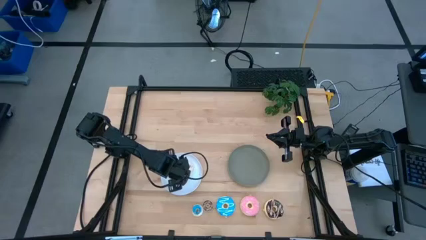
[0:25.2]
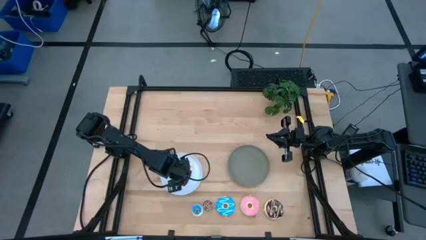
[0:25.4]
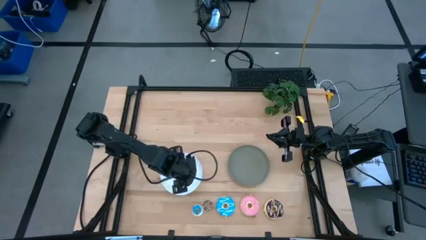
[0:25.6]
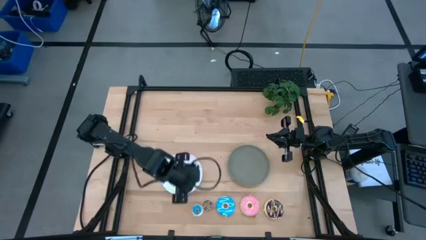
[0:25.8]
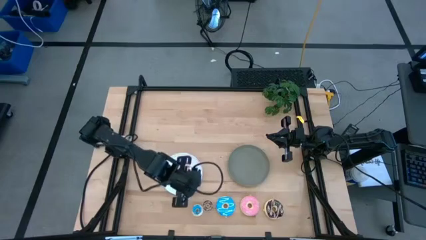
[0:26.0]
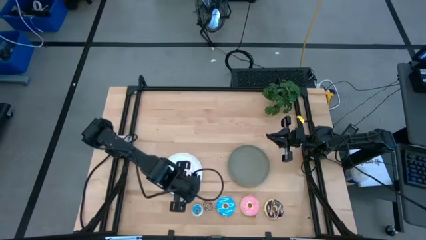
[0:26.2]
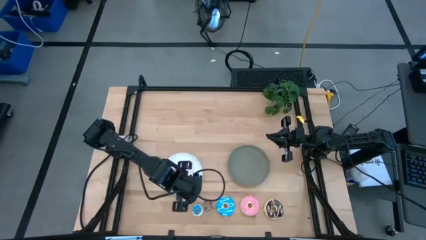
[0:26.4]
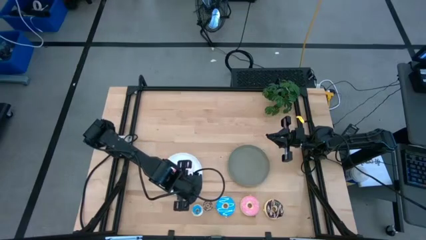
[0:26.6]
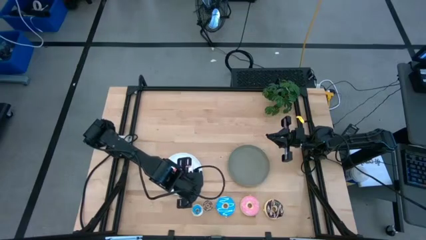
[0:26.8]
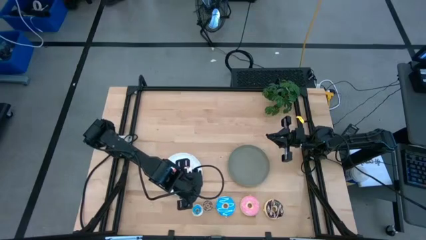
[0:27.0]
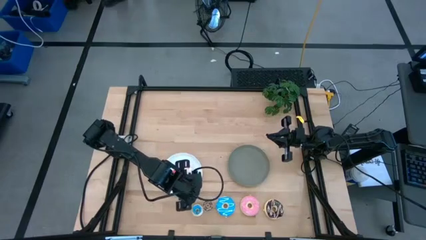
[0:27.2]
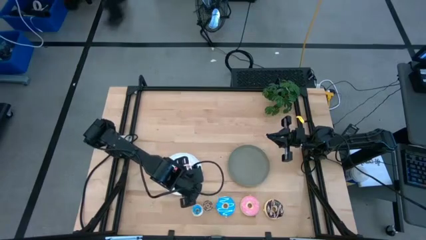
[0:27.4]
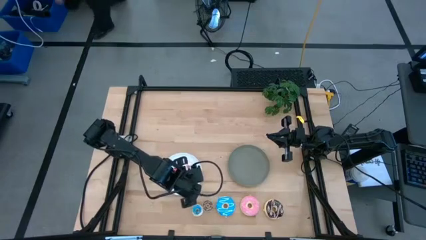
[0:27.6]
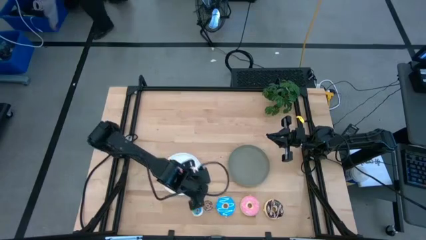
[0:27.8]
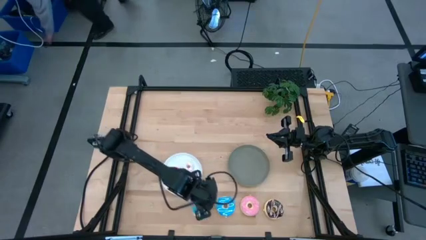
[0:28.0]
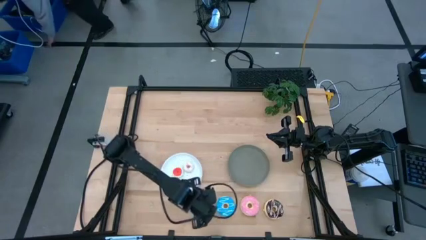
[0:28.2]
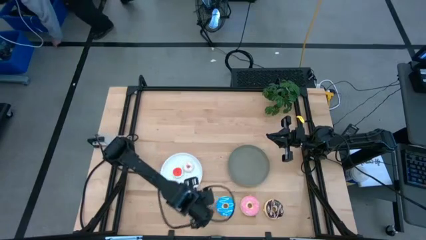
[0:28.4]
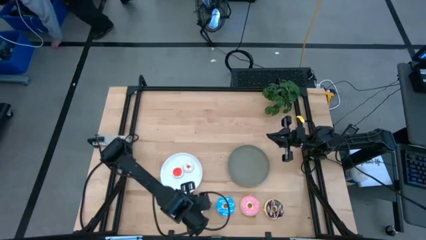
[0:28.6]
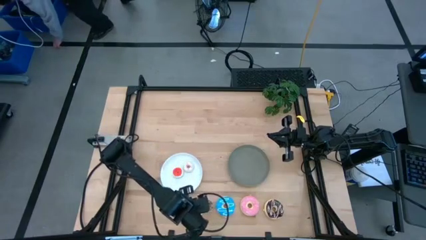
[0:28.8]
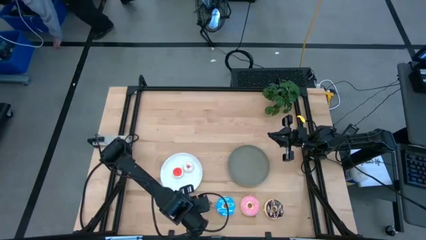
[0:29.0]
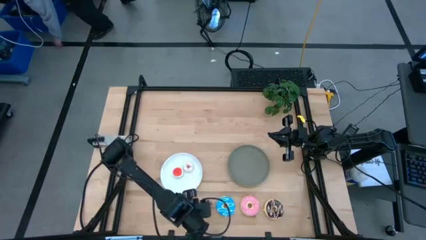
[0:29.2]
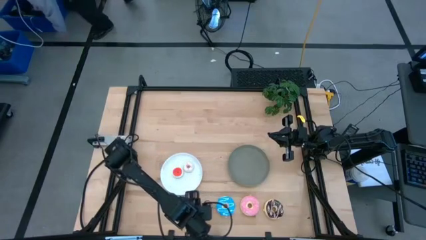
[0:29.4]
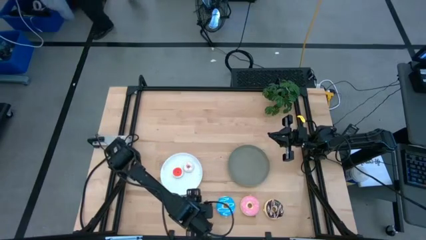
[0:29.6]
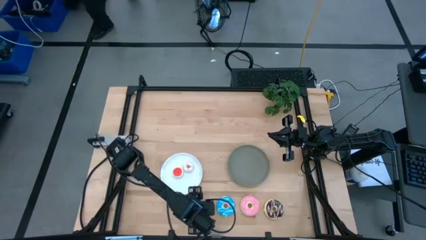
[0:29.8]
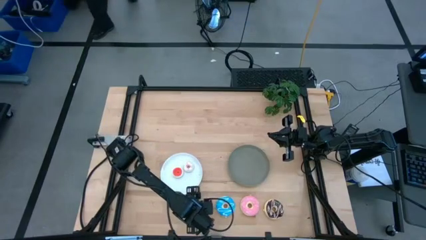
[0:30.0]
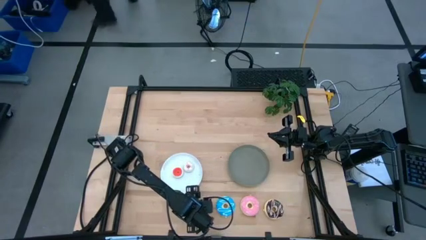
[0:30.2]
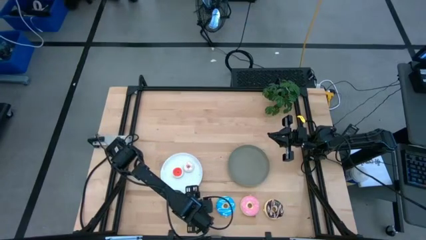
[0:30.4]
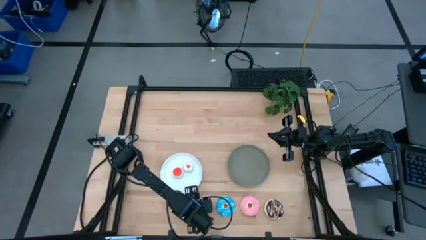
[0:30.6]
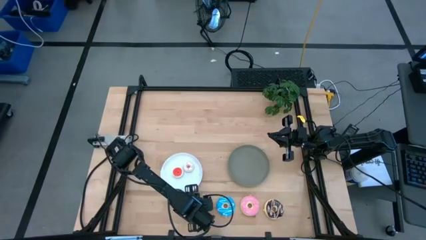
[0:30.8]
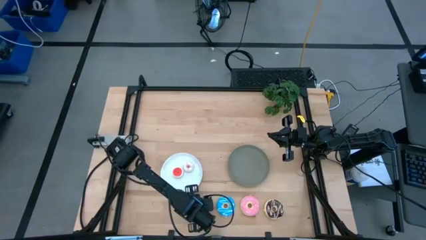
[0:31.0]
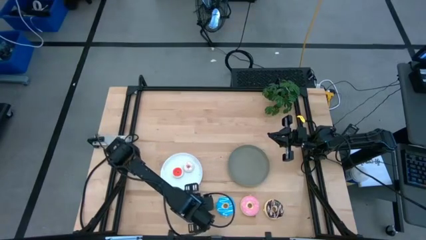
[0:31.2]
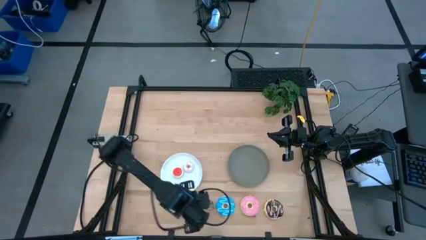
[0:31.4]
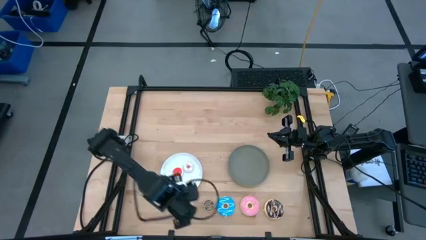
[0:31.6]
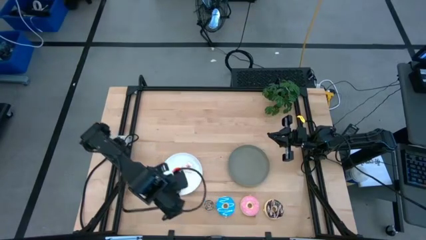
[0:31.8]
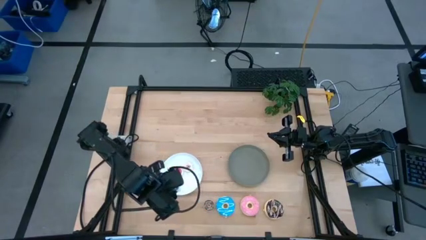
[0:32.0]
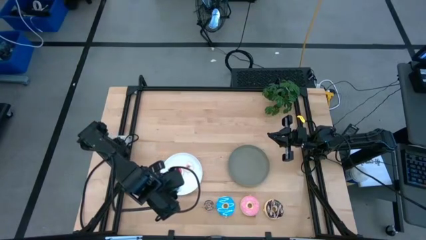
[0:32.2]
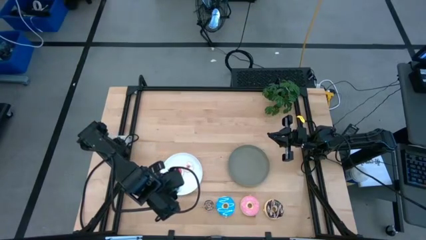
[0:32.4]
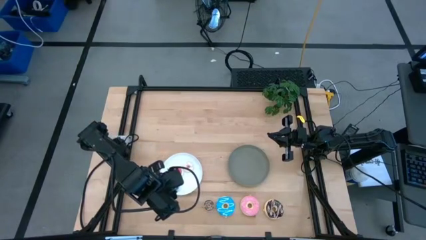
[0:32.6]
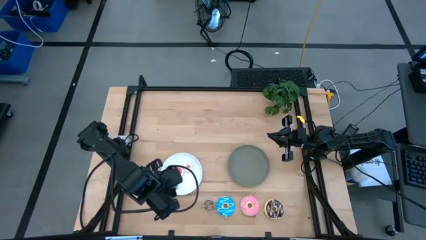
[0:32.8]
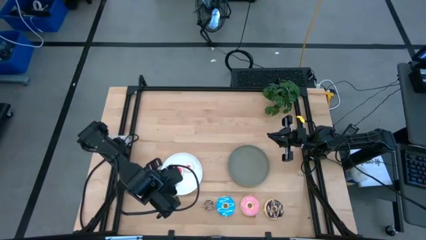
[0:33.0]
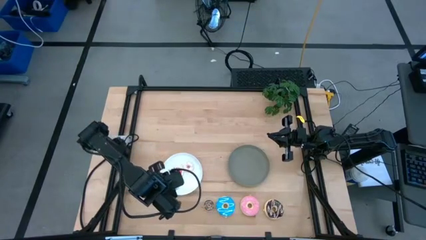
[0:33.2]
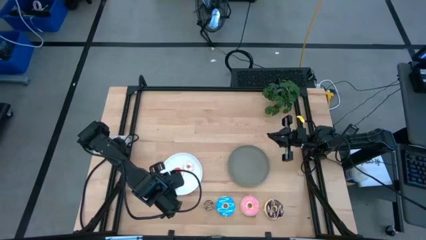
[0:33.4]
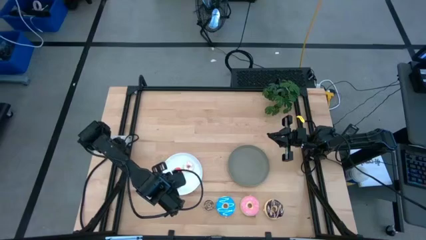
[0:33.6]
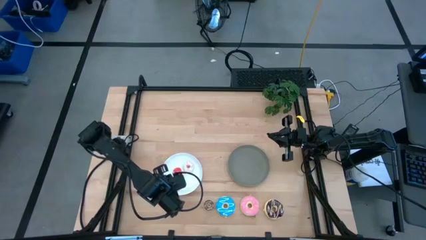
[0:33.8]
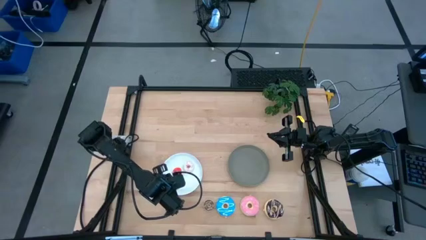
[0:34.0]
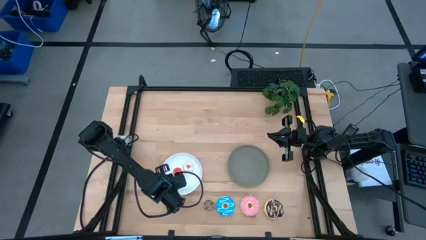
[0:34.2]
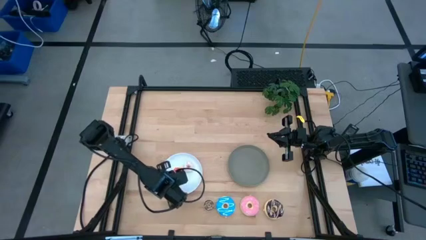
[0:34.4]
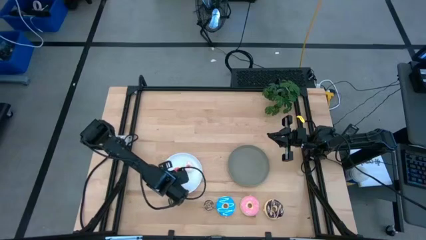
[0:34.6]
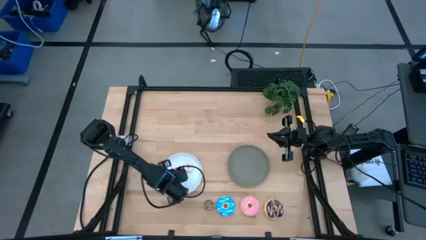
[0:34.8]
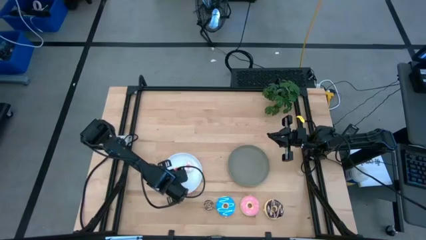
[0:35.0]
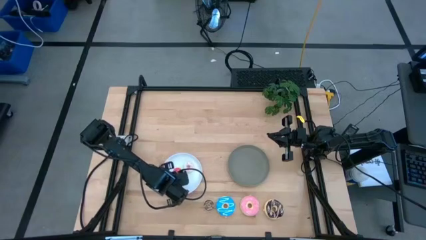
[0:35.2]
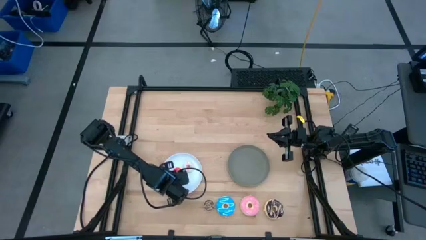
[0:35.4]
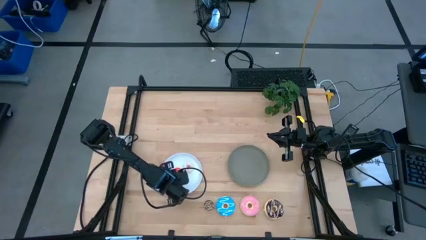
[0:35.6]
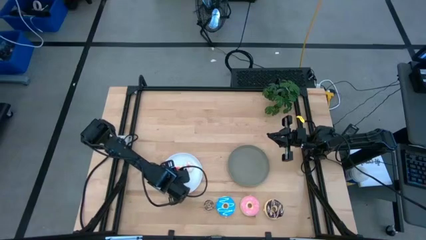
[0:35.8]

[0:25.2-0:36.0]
Task: Pick & Place donuts
Put the small blue donut on the white plate

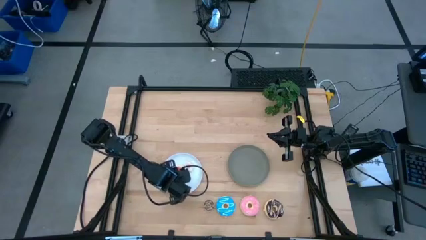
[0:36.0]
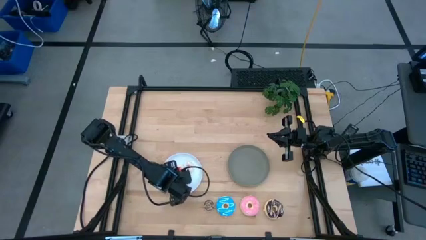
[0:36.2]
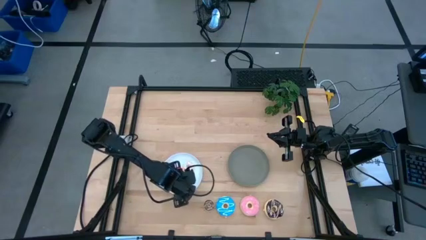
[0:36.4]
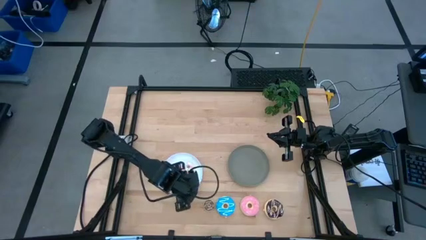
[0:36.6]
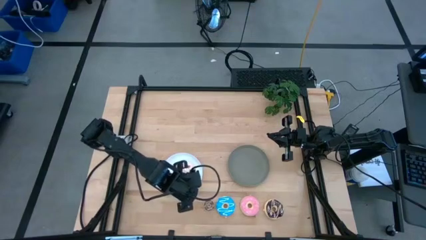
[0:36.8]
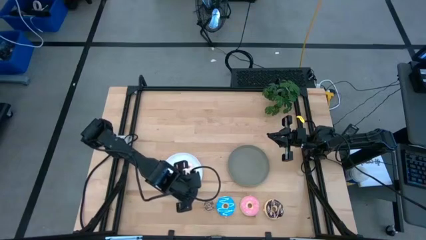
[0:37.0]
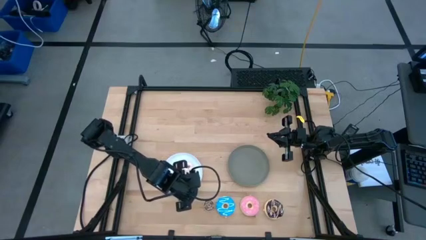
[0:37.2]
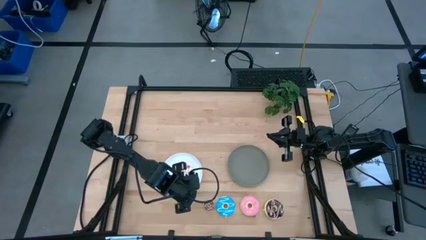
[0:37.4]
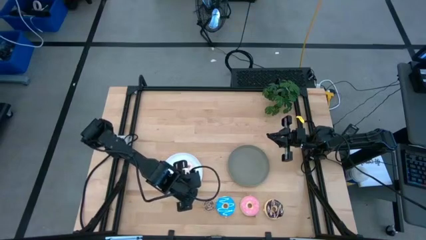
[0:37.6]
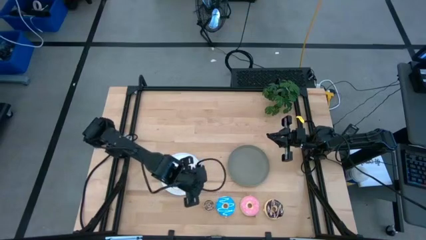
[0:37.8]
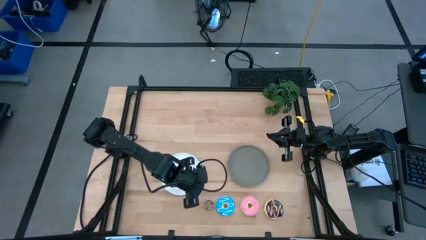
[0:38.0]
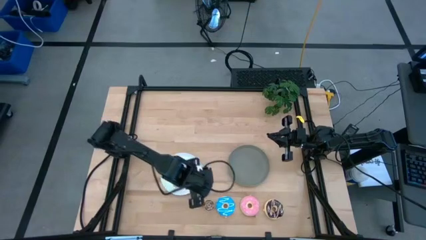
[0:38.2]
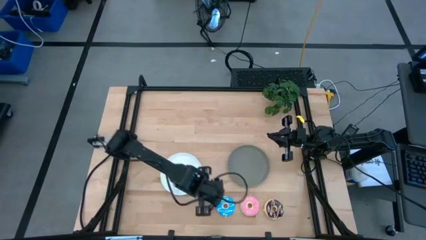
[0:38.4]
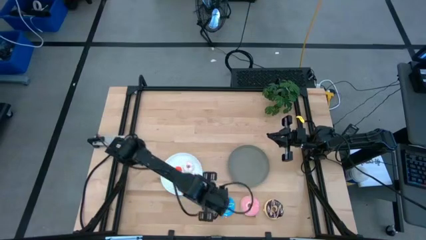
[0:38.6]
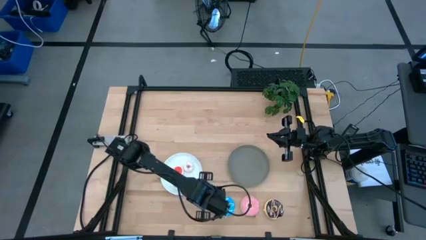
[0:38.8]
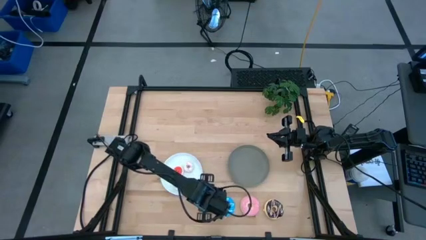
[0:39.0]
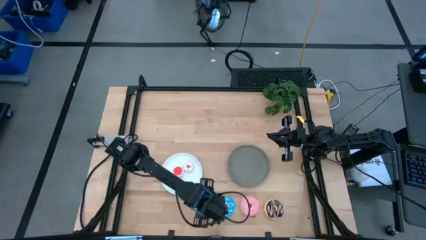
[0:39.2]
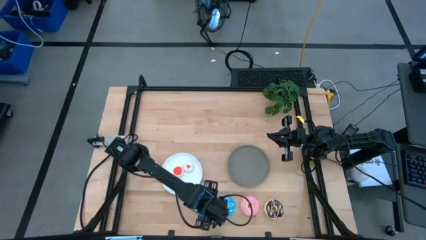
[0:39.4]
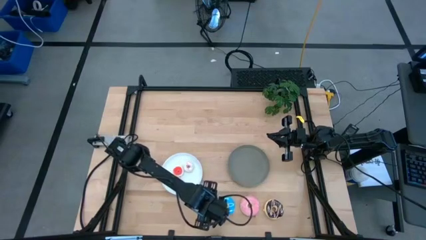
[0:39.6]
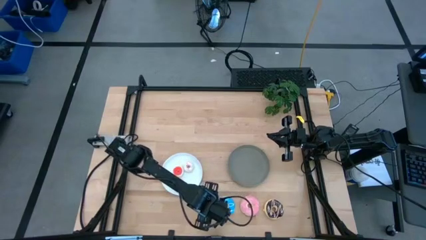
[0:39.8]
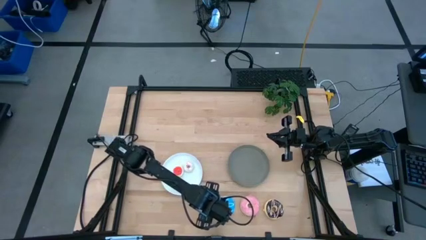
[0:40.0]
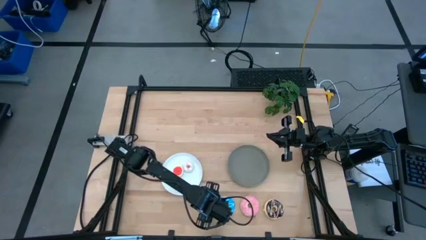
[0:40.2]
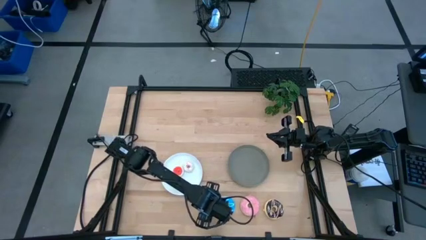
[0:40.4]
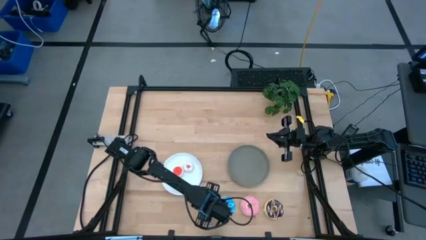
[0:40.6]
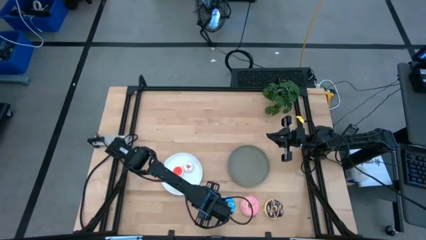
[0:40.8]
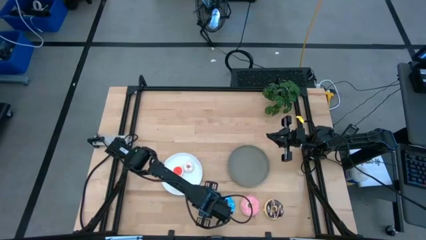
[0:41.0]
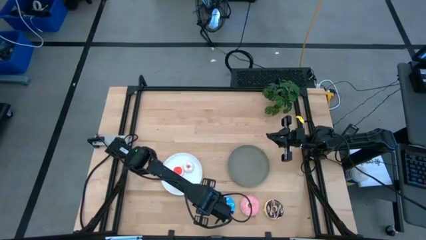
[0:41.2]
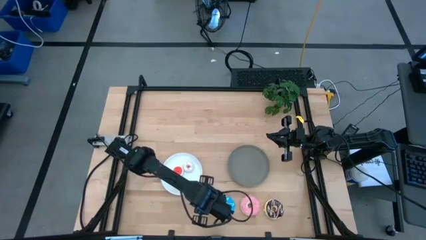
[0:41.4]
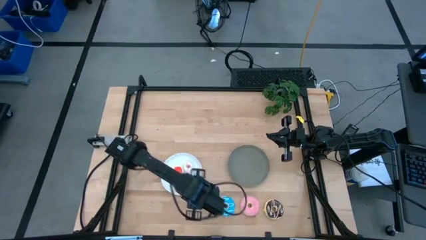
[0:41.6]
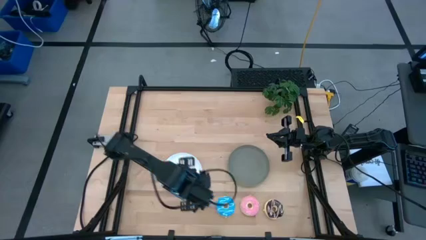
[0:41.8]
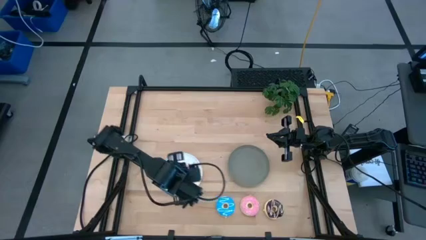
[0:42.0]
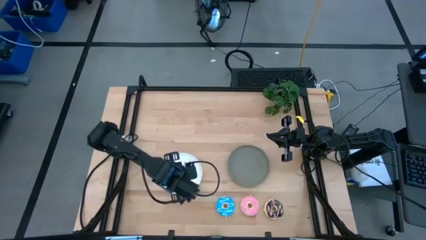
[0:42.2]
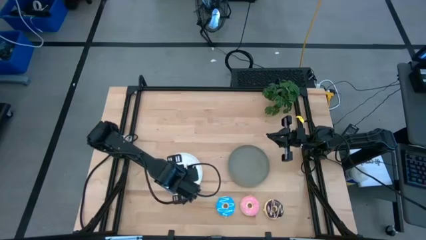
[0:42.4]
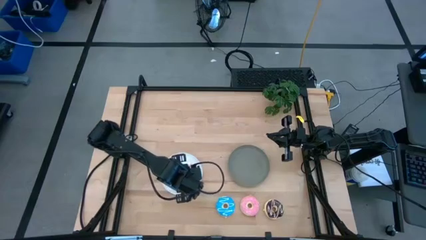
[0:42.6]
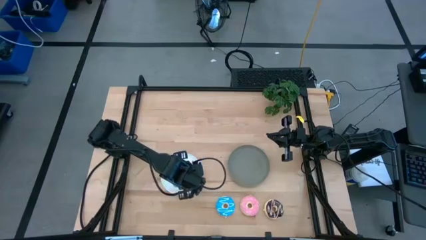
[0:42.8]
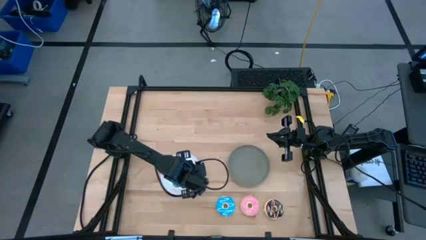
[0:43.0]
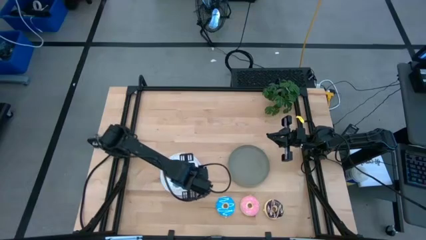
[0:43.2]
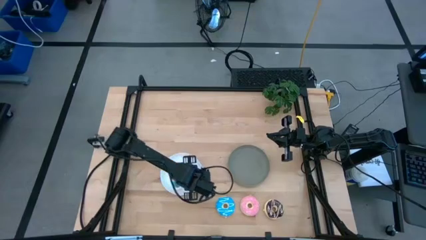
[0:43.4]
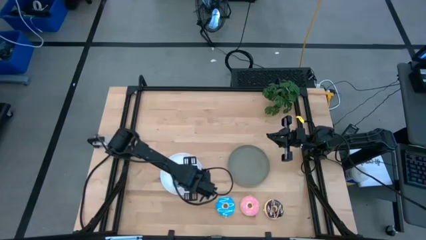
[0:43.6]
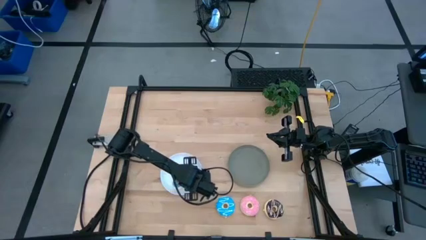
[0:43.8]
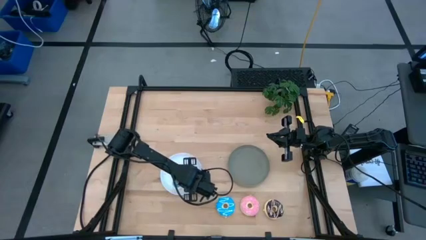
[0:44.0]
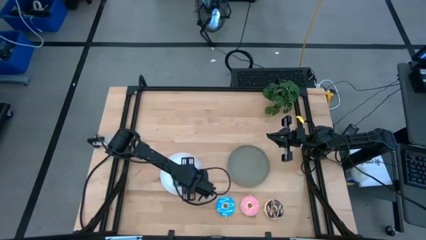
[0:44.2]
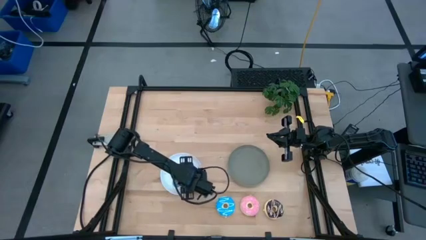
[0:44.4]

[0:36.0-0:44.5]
Put the small brown donut on the white plate
